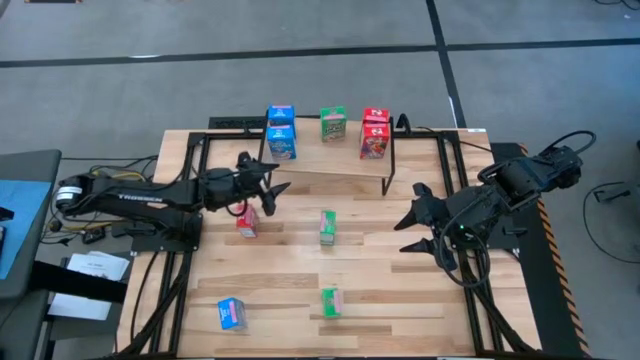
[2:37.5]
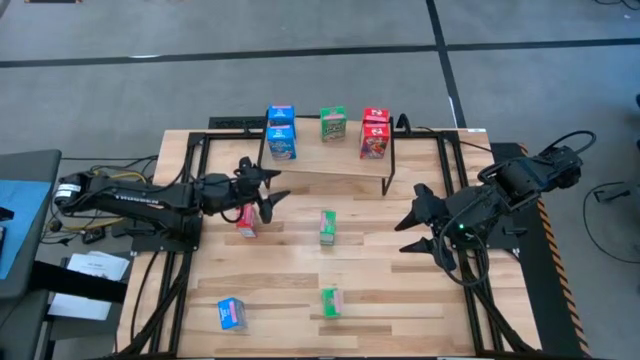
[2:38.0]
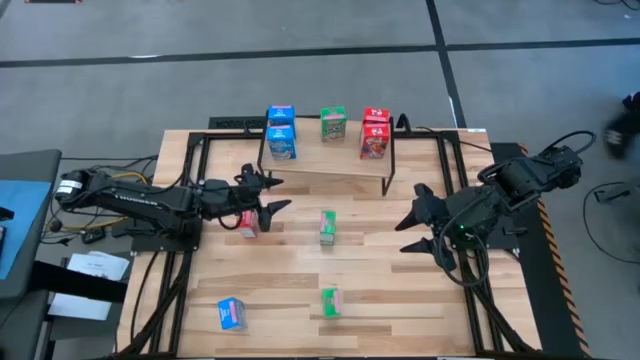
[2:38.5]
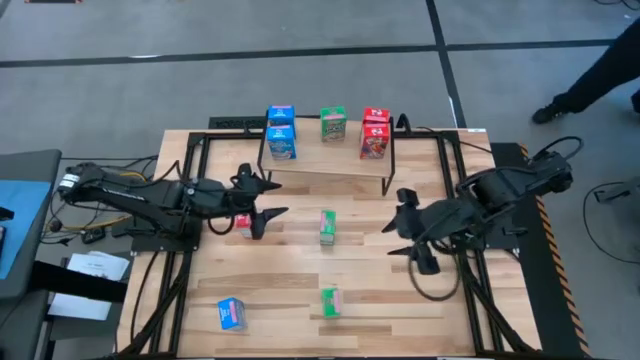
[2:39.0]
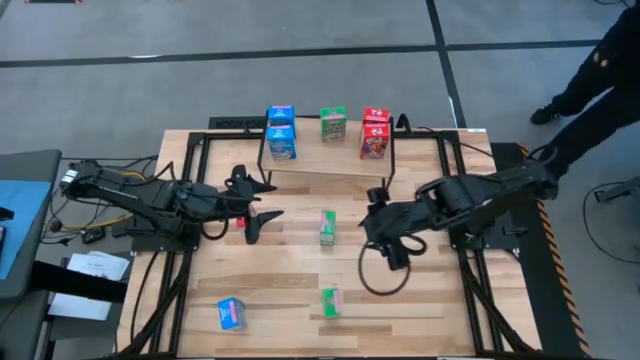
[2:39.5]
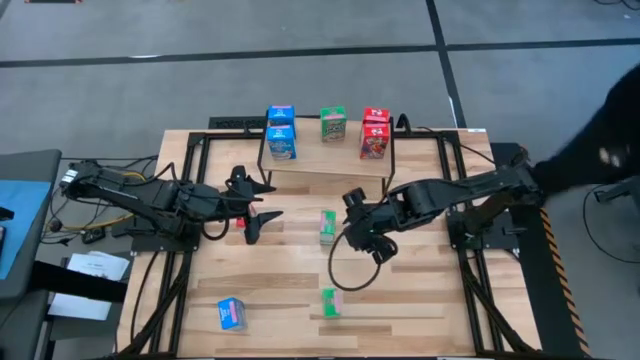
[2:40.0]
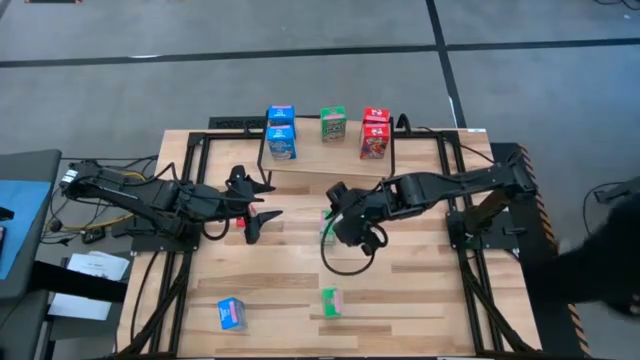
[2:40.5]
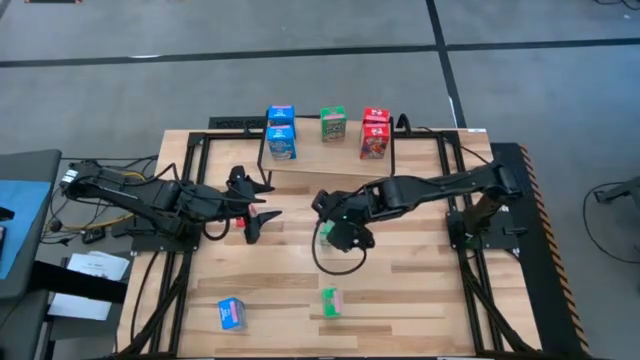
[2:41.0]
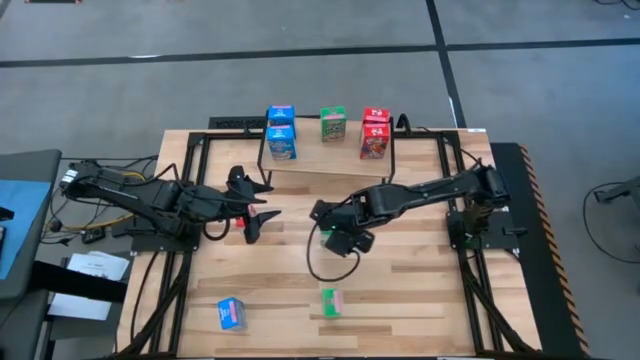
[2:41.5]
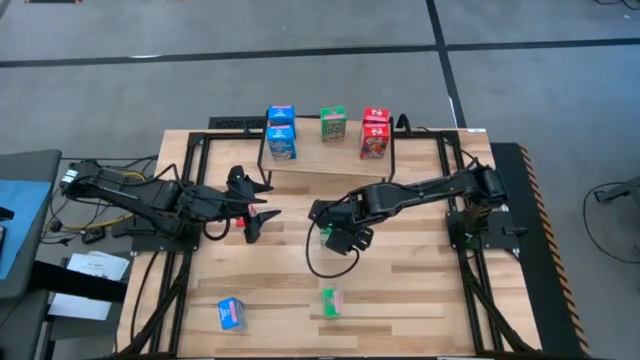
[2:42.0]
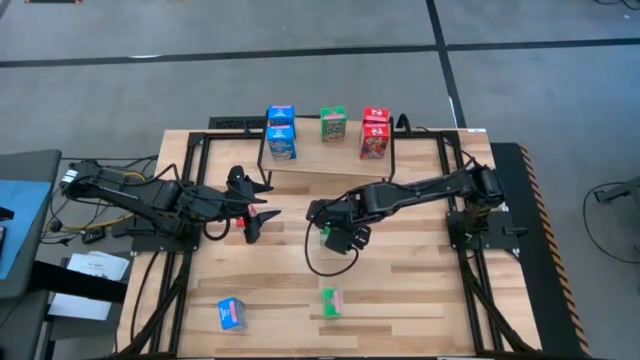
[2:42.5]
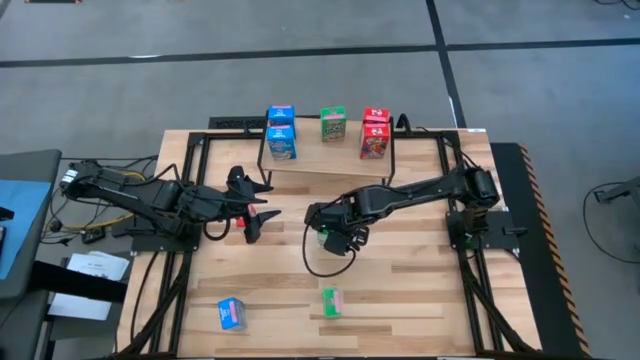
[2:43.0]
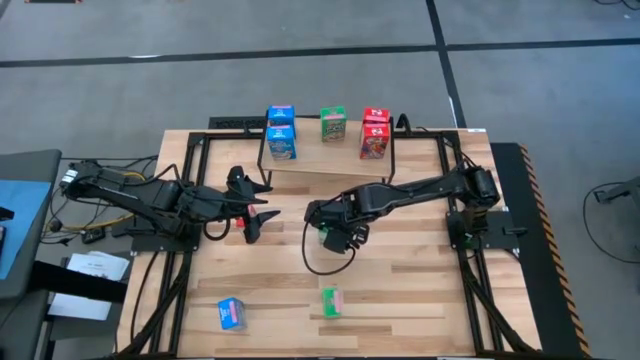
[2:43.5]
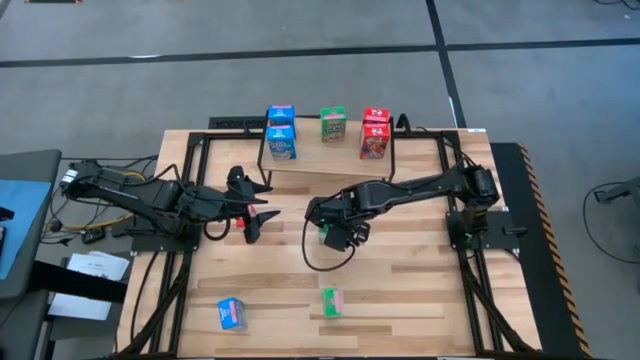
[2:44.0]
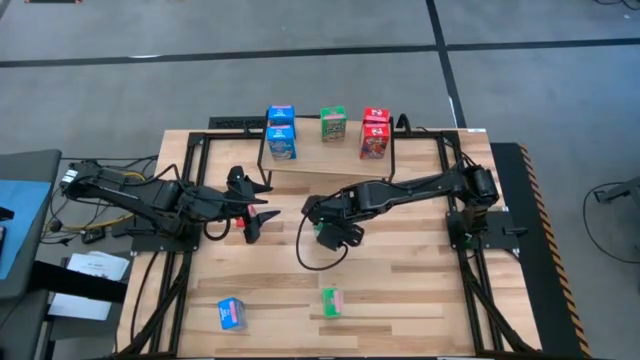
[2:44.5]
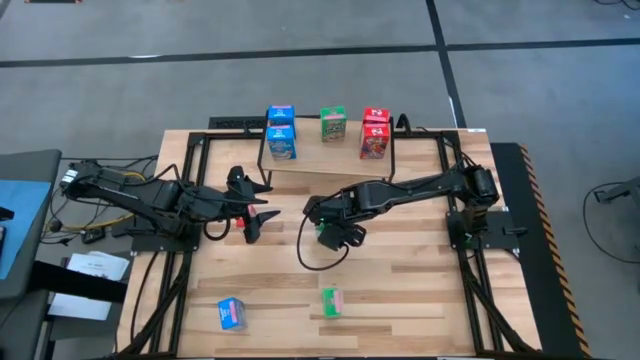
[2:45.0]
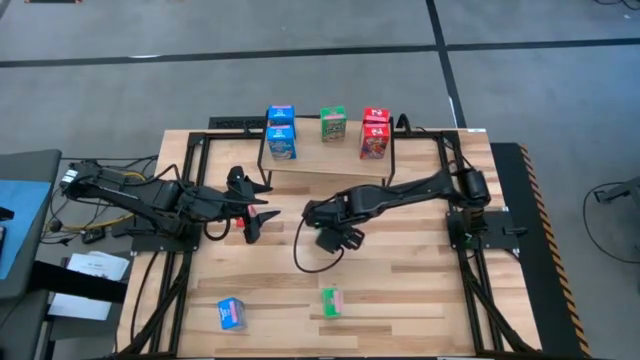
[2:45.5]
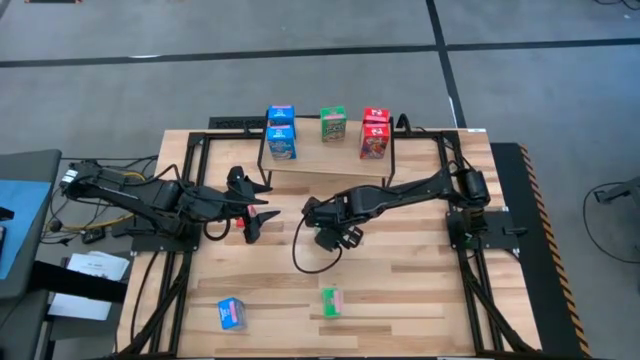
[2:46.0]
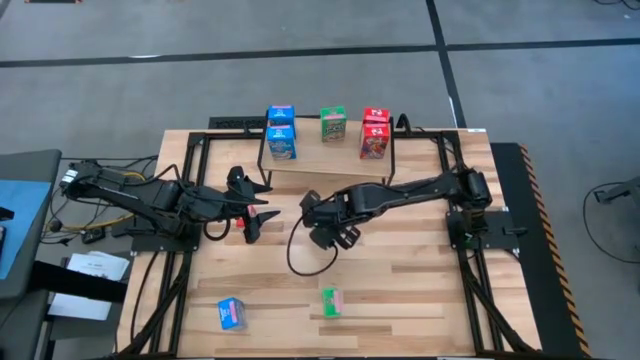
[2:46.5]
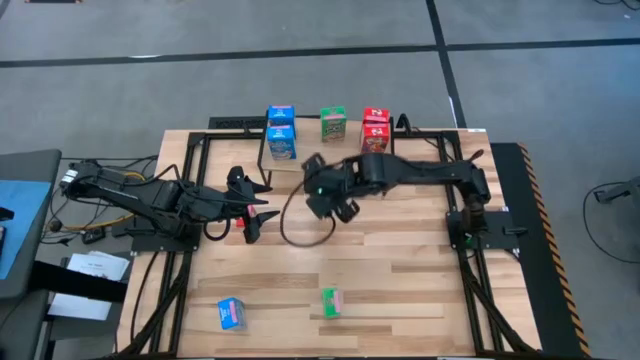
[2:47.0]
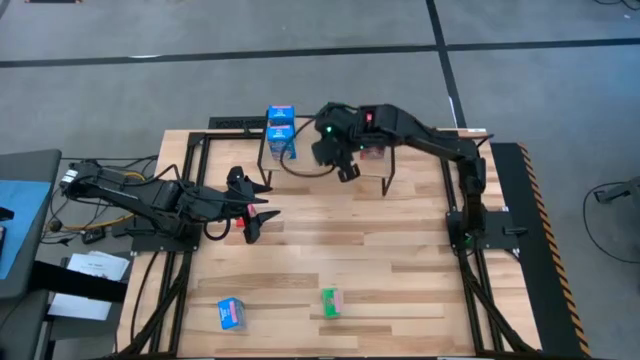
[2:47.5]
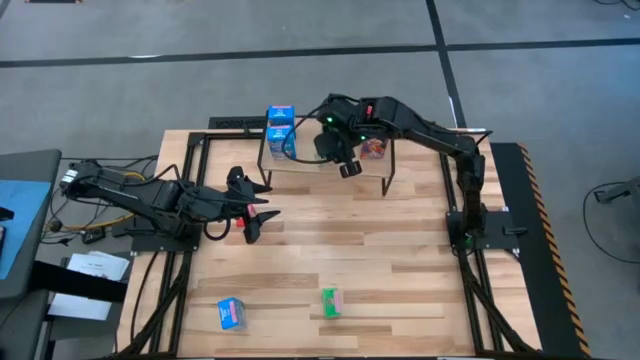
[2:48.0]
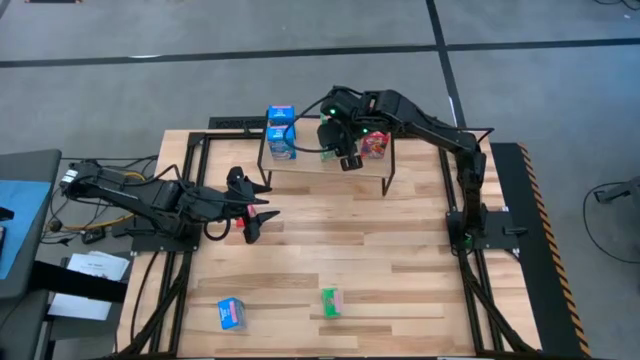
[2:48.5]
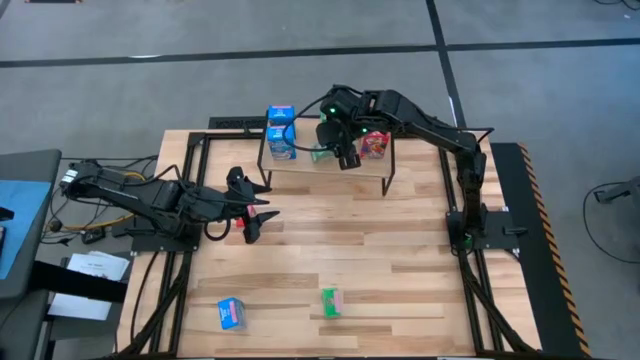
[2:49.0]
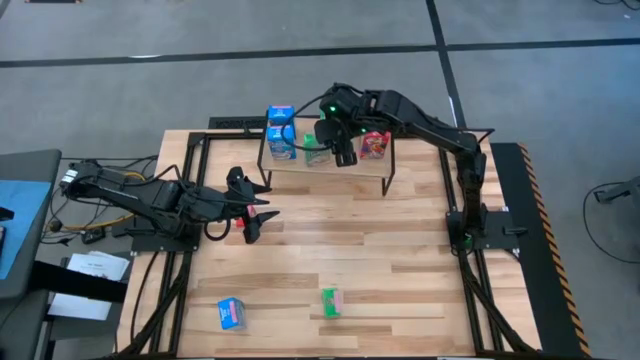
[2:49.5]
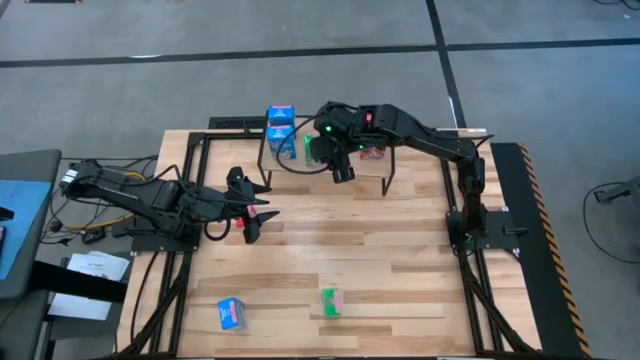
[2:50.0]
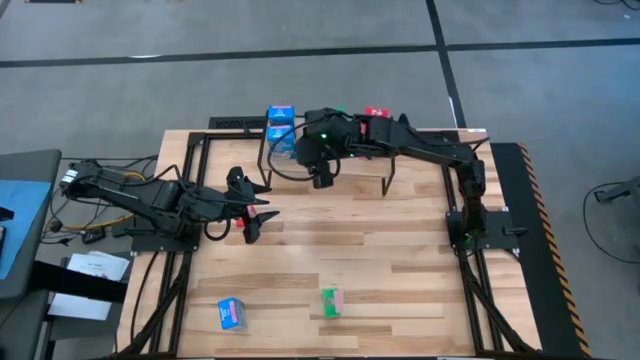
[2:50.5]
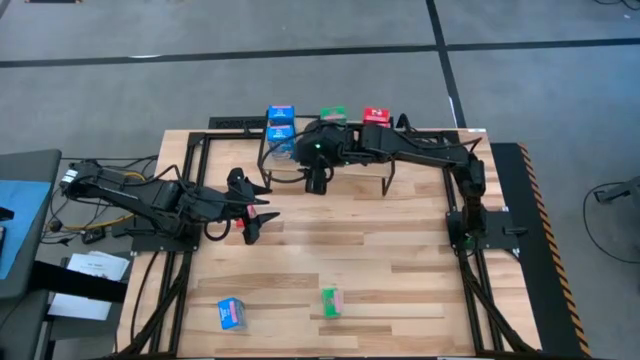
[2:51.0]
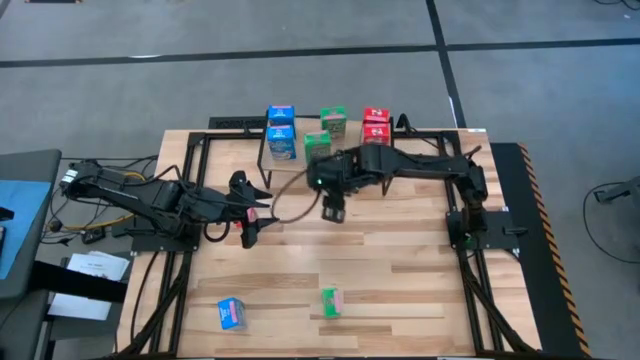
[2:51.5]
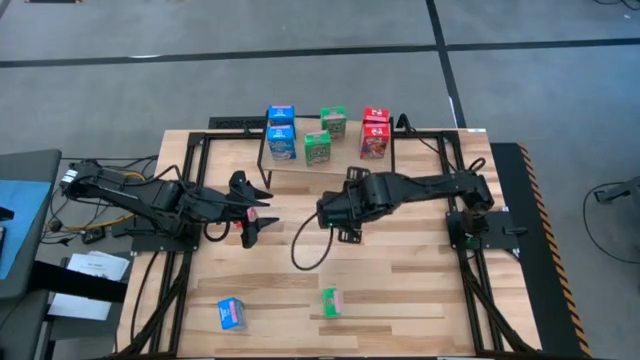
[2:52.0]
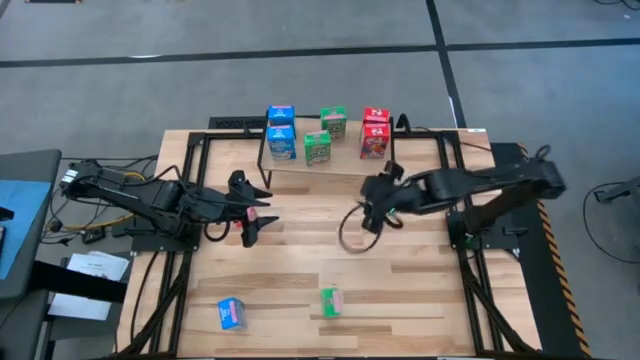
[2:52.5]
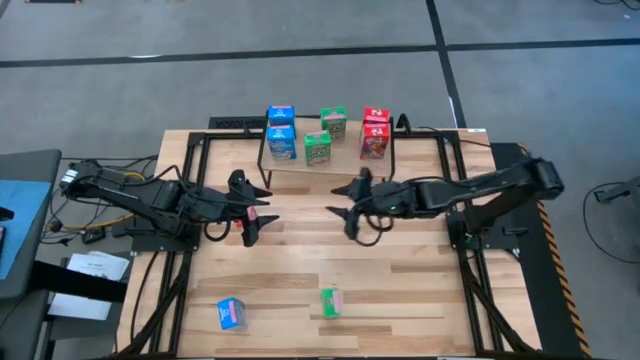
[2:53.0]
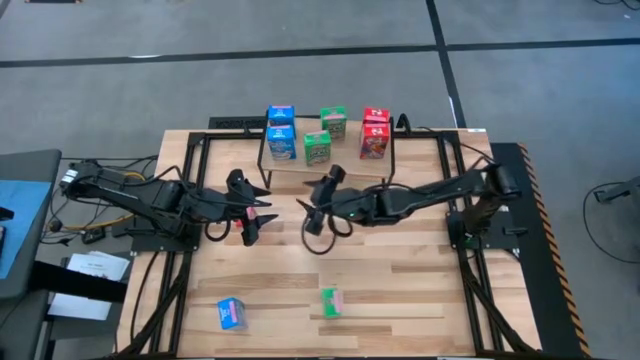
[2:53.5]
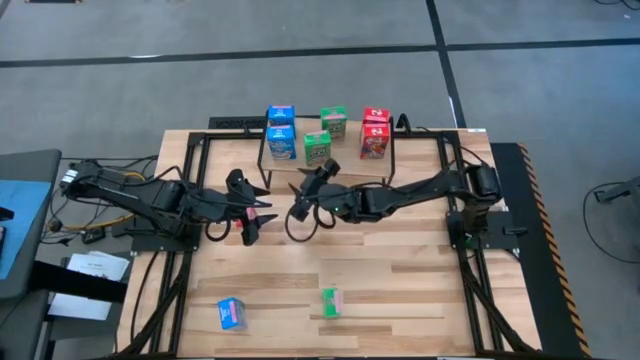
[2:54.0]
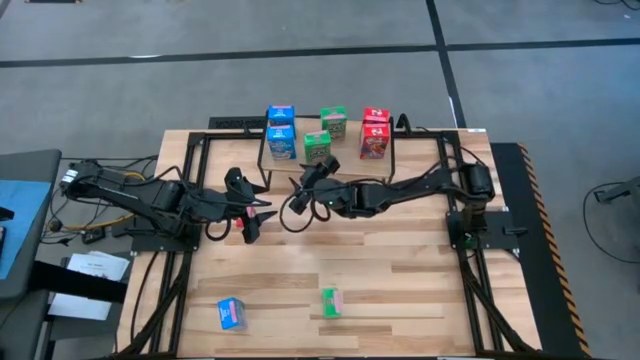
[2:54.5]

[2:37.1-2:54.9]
Task: Stack cereal on shelf
Put the top green cereal box on the shelf aligned with the other green cereal box

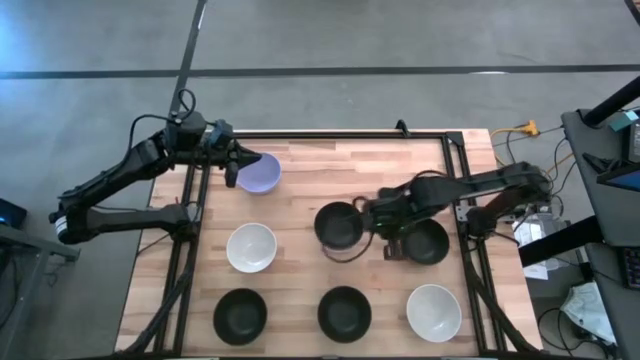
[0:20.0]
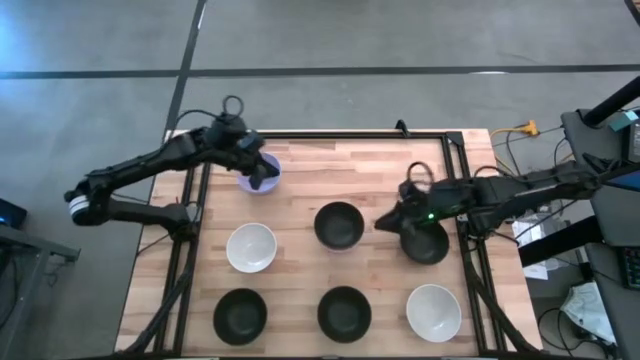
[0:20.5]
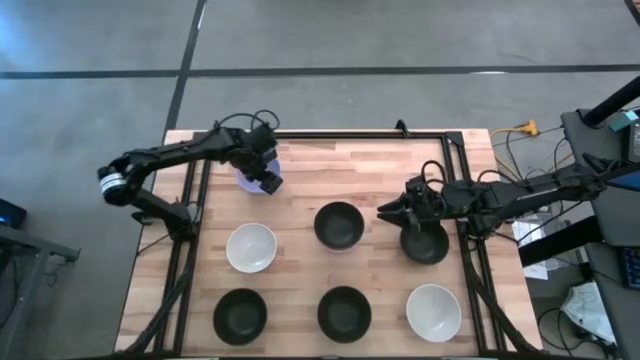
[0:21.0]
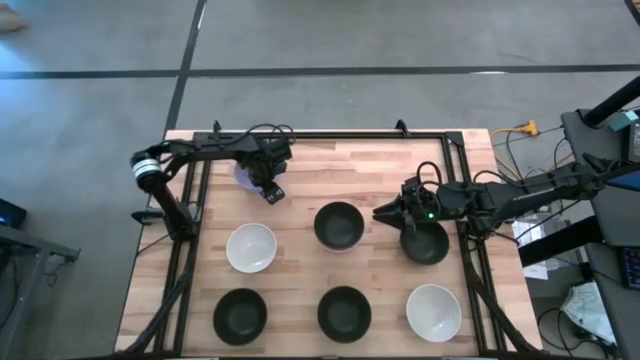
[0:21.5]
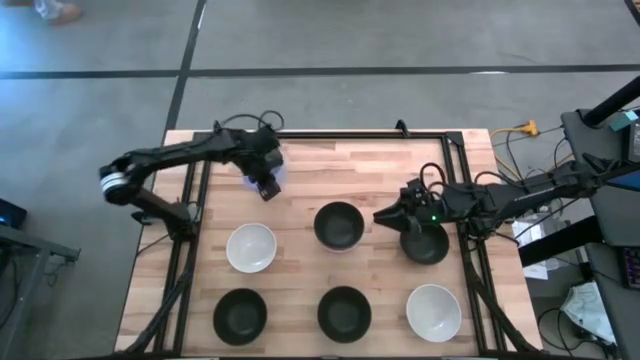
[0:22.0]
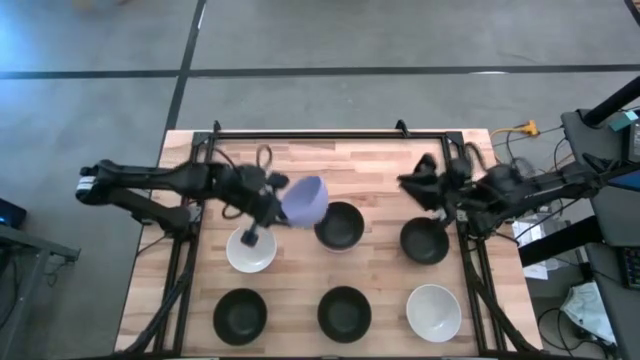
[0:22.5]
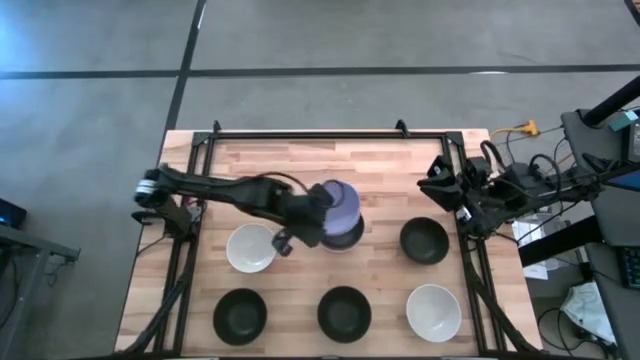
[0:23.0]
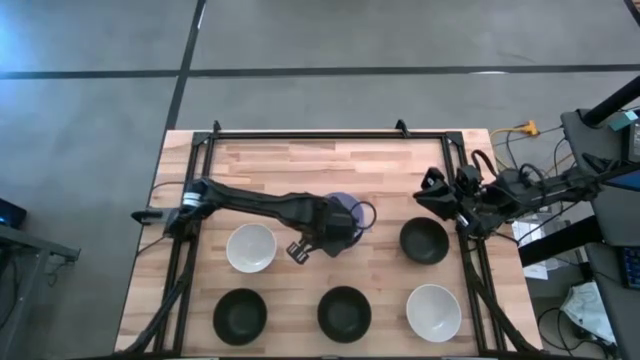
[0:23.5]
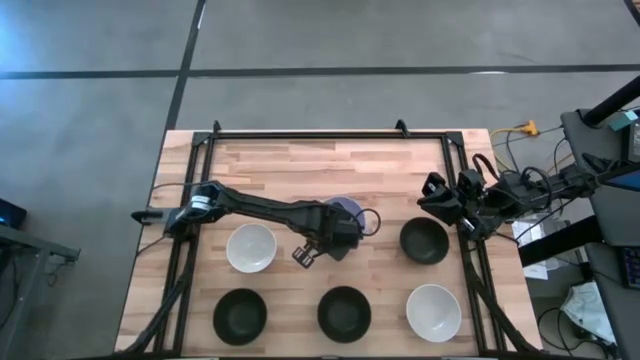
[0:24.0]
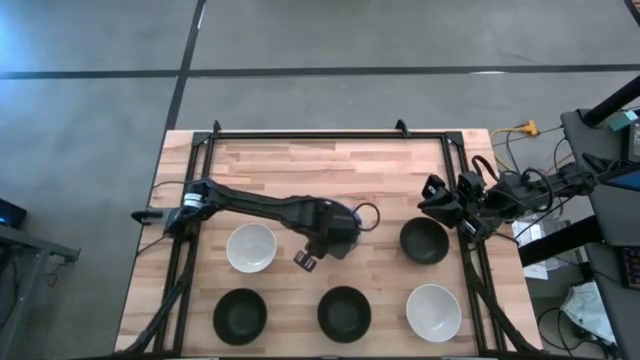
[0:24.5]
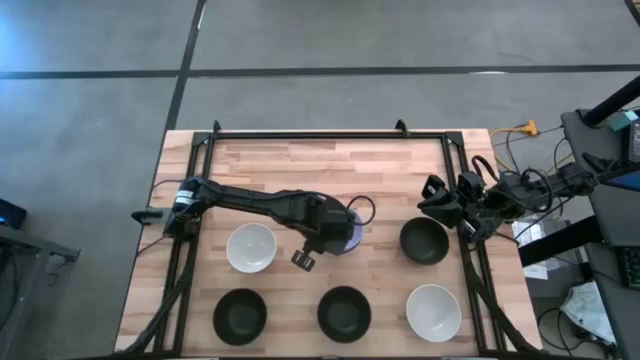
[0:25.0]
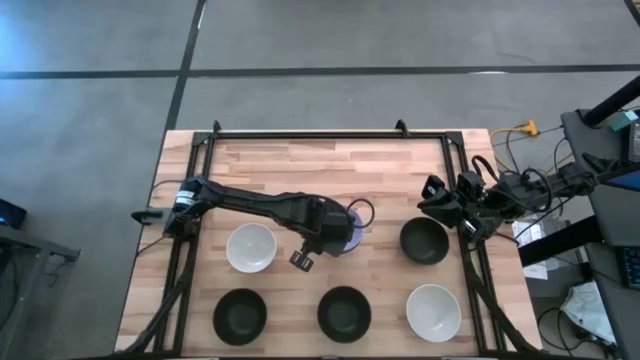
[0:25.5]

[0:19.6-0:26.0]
Task: Nest bowls inside each other
Stack the violet bowl on the black bowl
